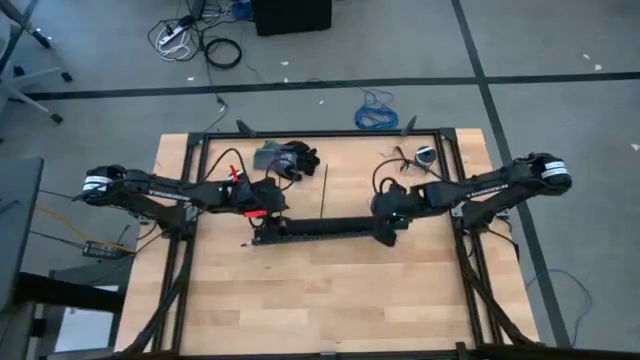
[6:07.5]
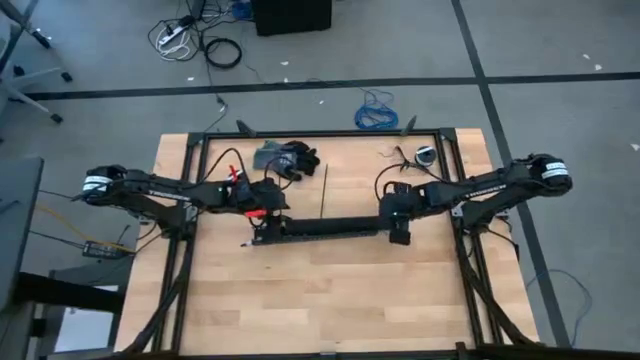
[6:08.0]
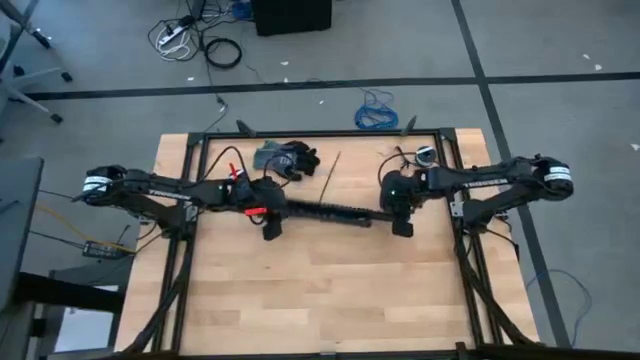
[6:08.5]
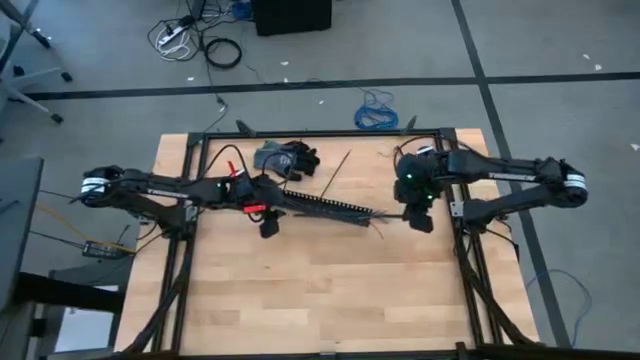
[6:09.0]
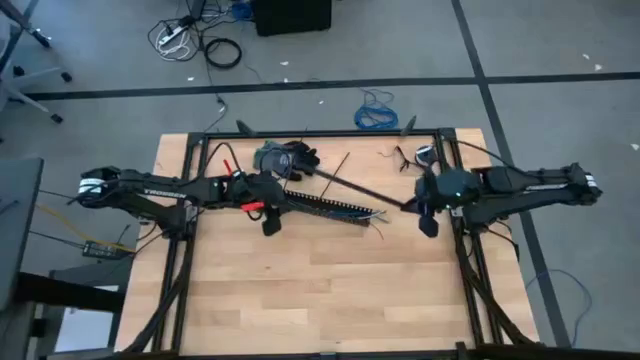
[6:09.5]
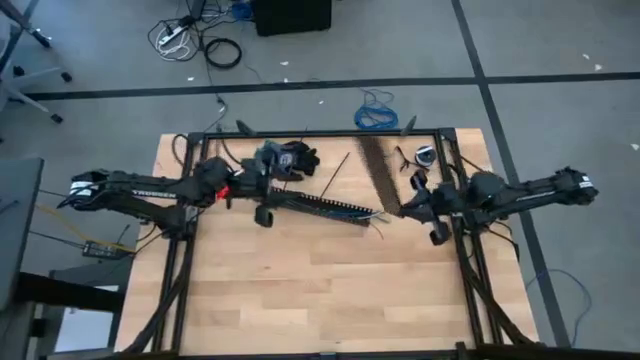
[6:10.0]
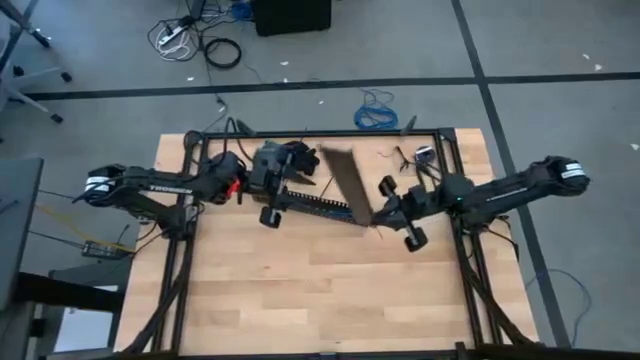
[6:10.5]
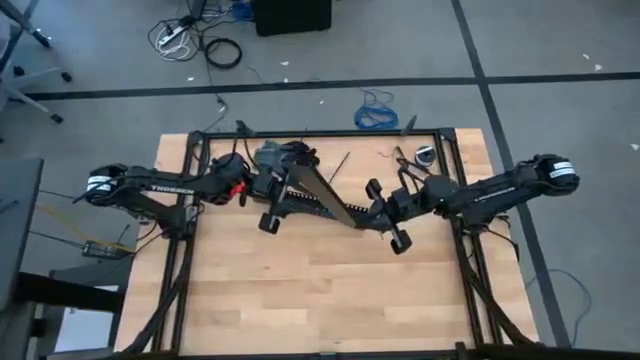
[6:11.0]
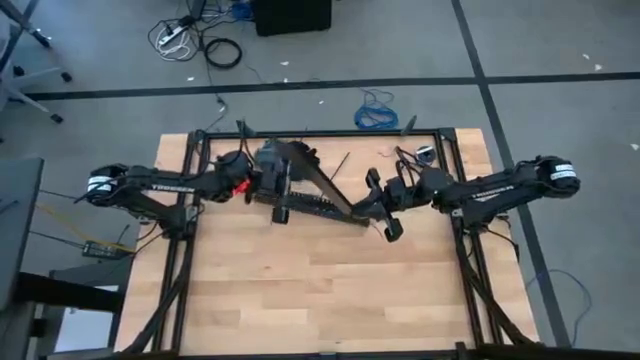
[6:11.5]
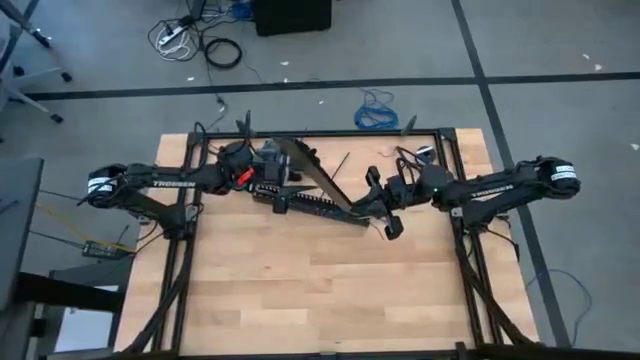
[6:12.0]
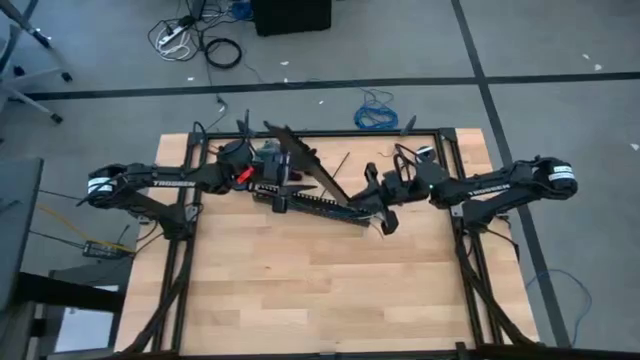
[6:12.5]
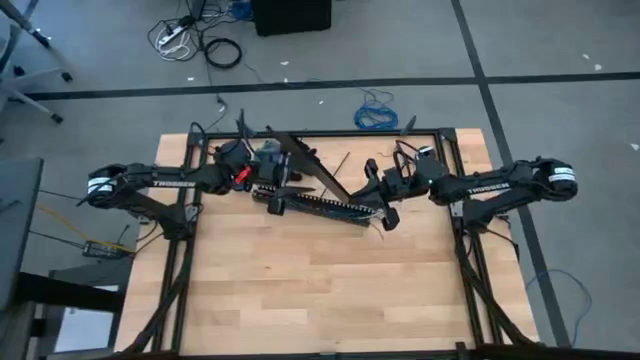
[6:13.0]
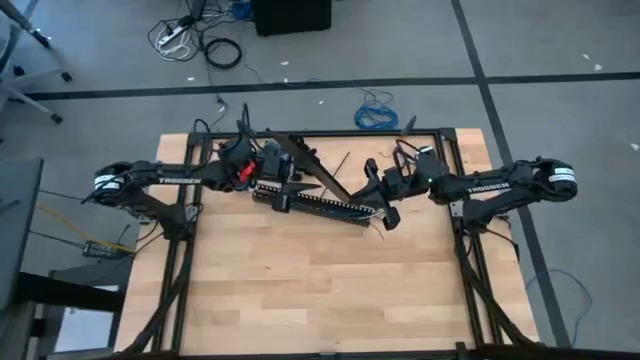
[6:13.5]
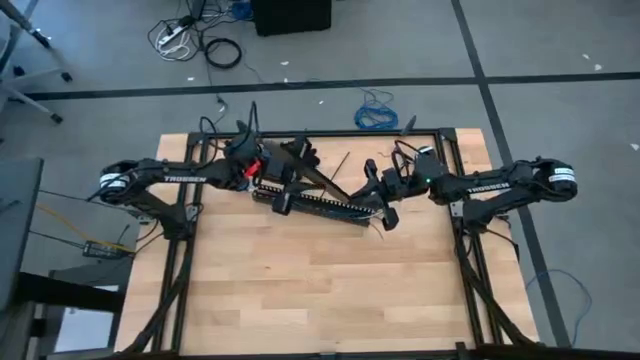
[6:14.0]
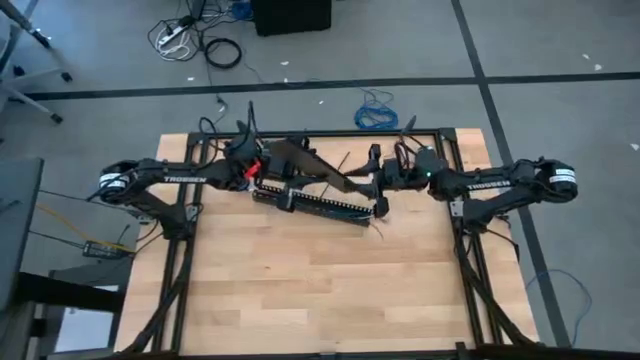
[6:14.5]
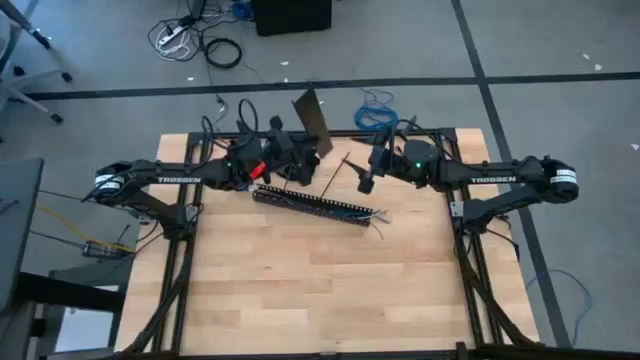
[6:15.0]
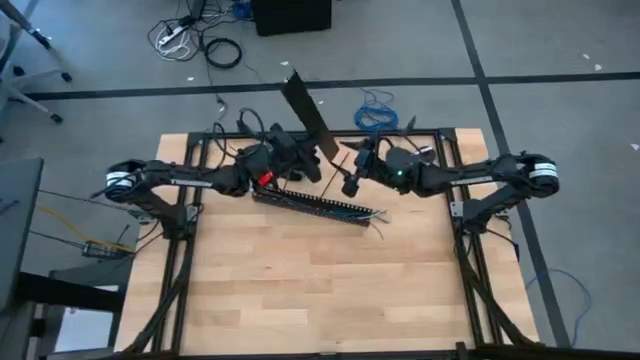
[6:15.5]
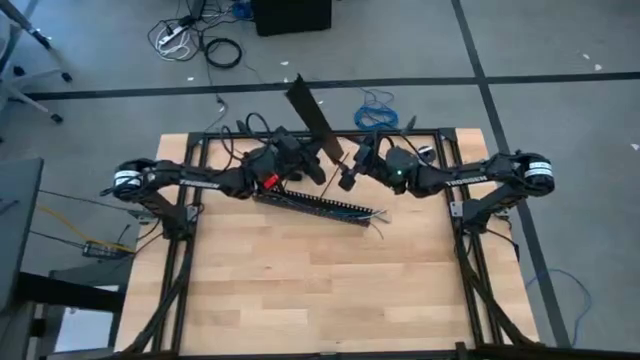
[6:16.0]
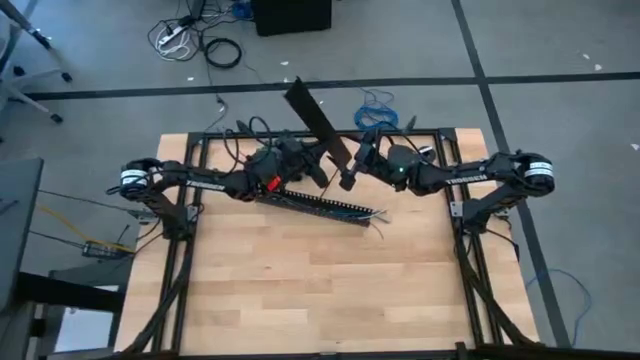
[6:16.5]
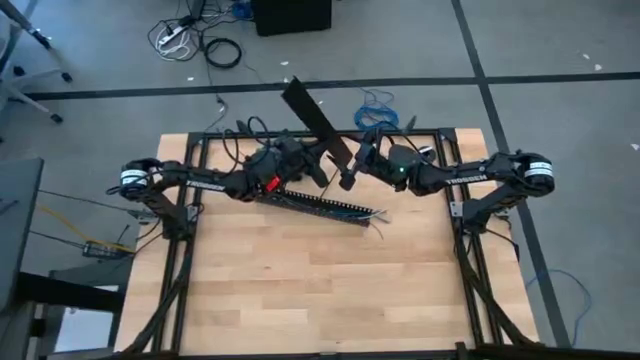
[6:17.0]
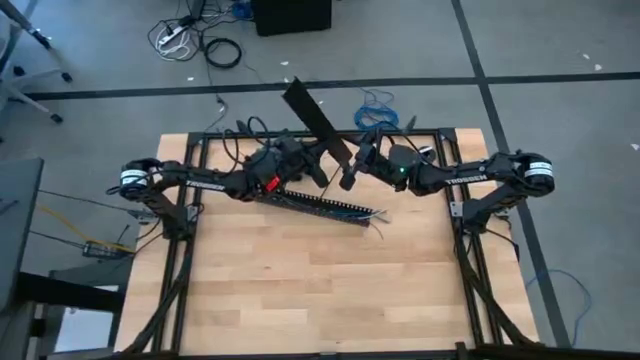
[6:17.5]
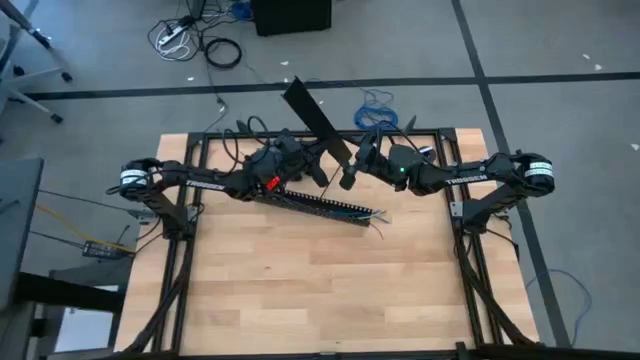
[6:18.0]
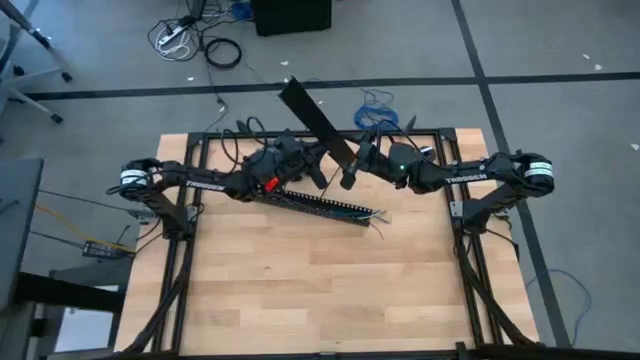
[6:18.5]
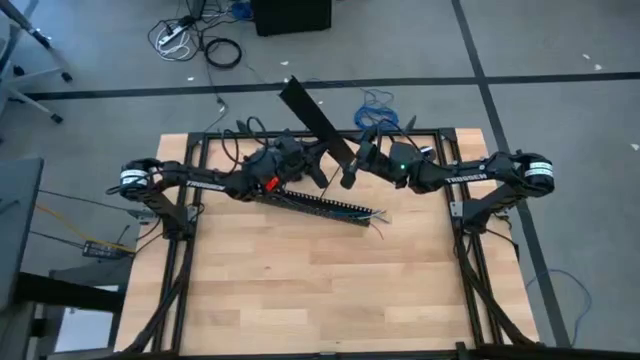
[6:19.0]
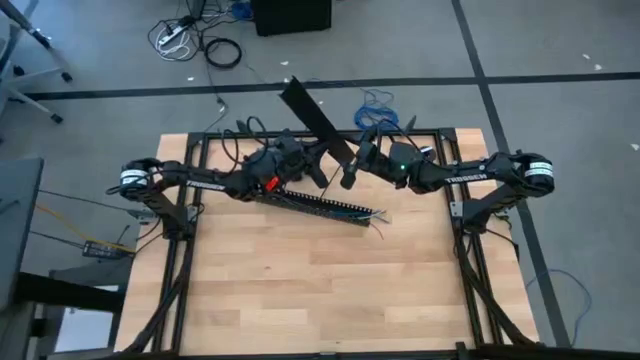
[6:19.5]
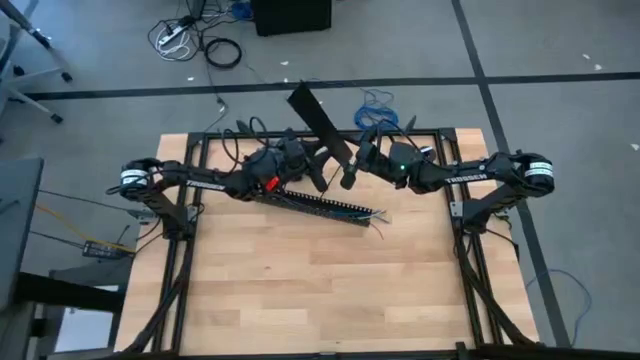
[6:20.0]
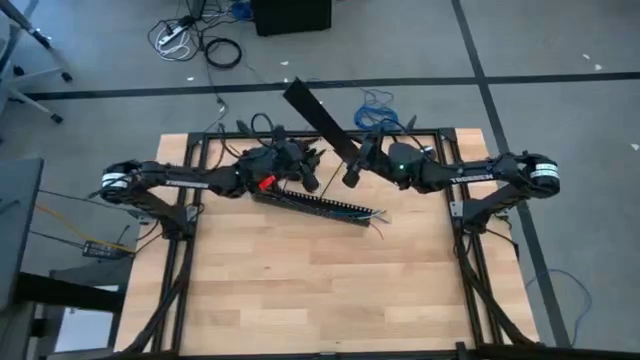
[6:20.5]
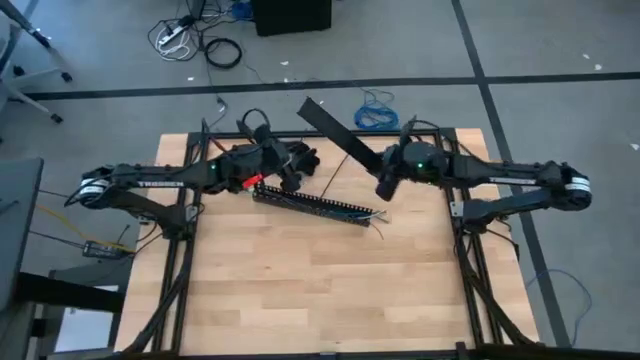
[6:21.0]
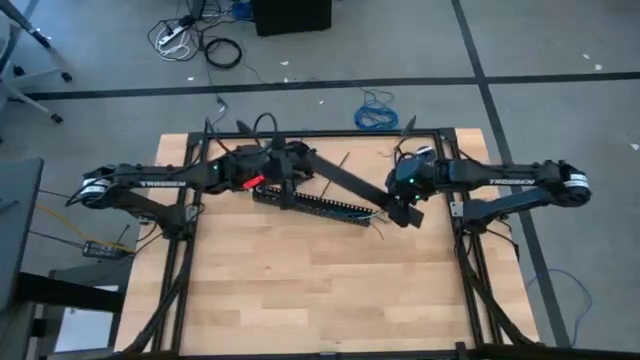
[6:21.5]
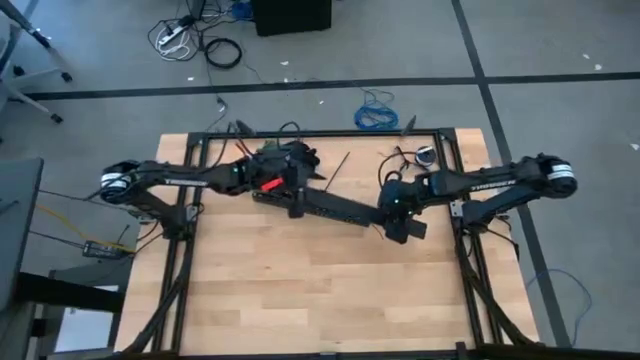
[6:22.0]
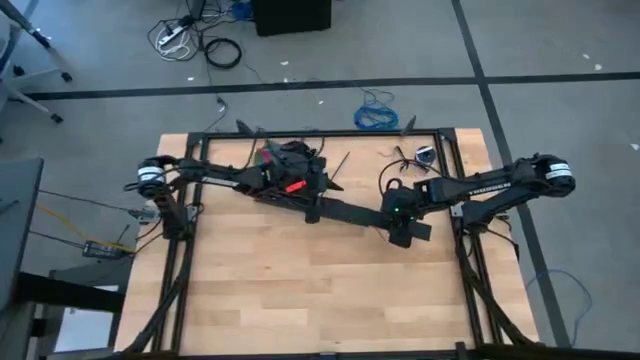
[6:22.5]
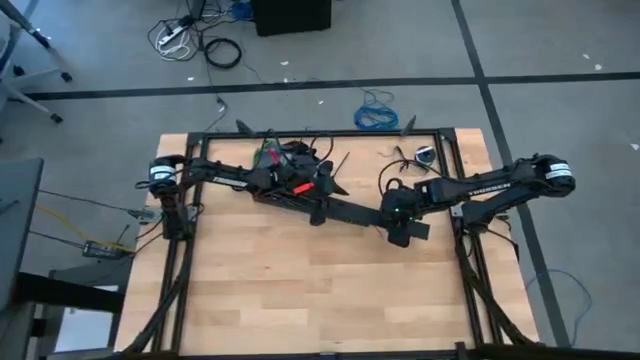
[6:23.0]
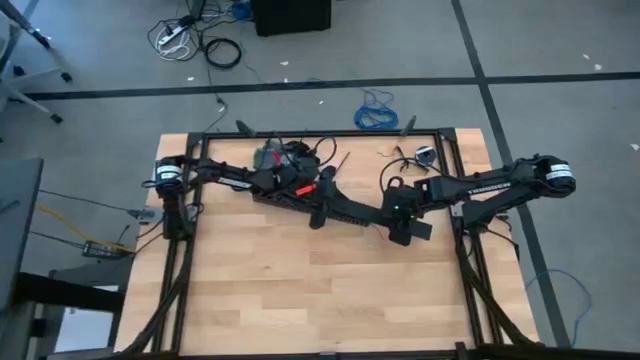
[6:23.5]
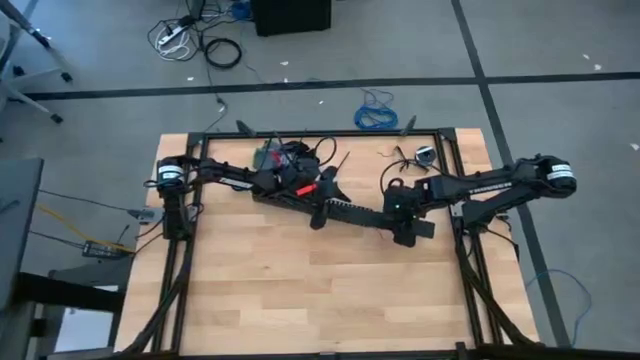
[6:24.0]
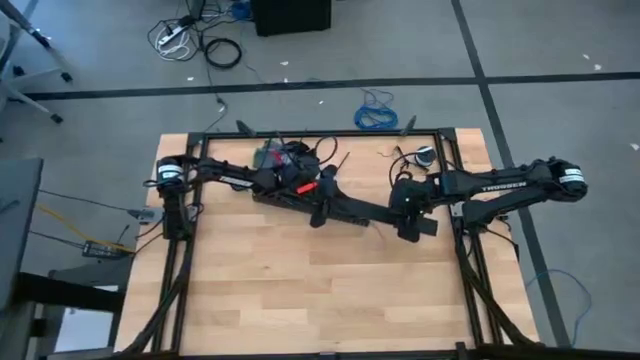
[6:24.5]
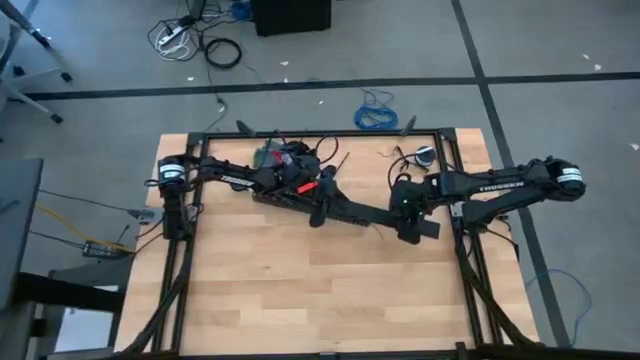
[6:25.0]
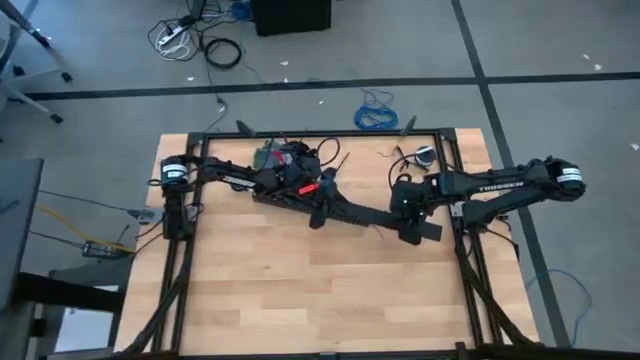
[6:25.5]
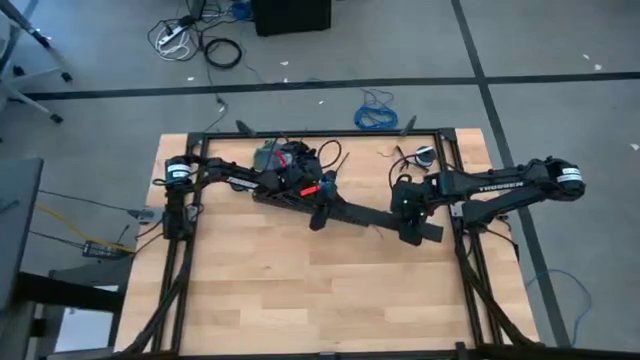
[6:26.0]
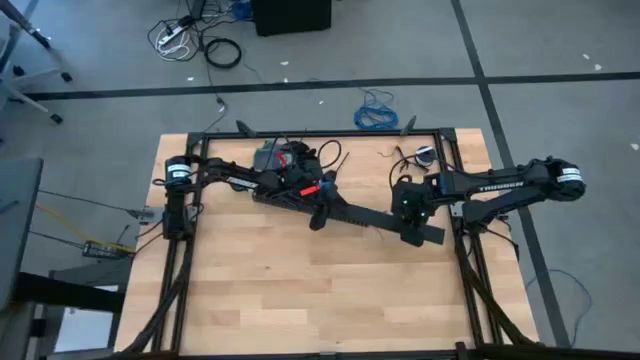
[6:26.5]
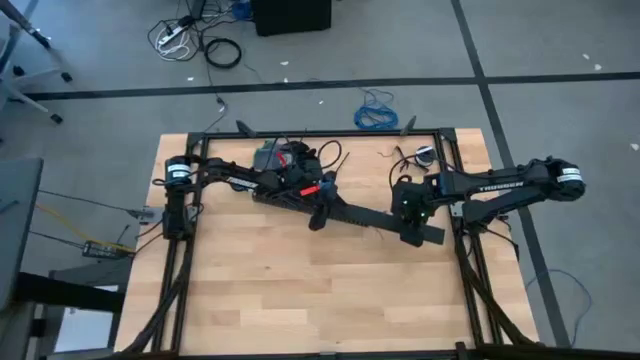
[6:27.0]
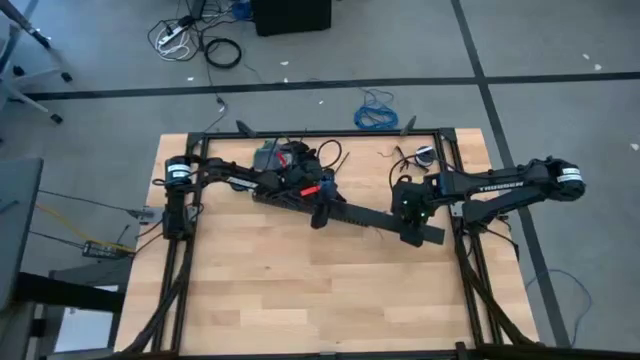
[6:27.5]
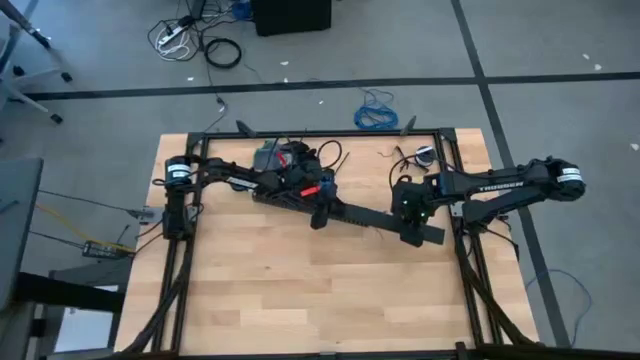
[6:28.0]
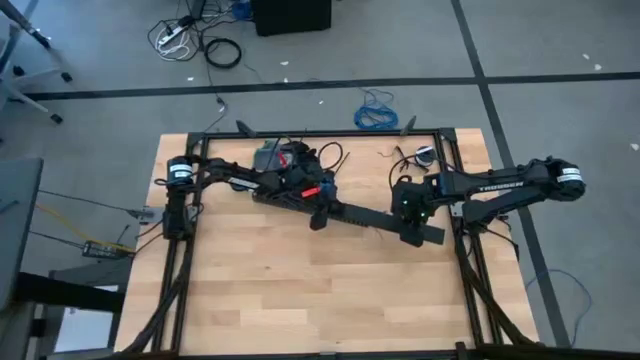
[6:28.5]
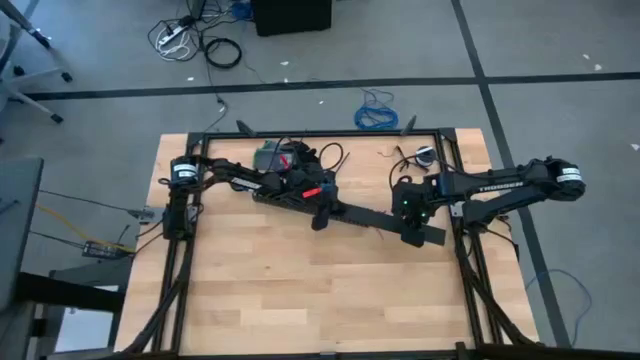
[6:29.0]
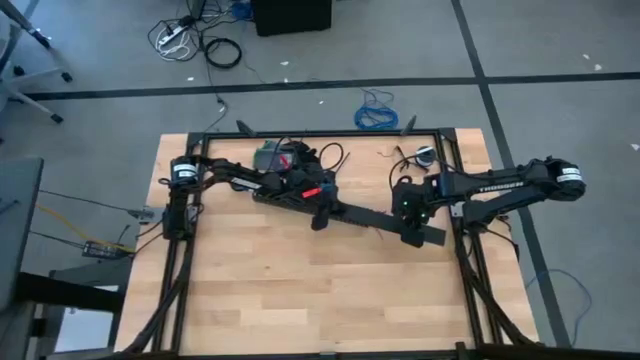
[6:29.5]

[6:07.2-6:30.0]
Task: Ziptie cables
Close the black cable duct cover
